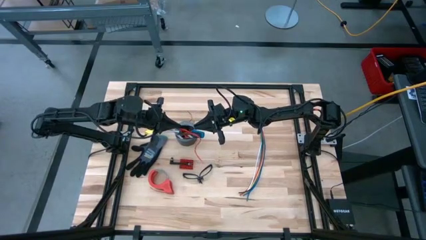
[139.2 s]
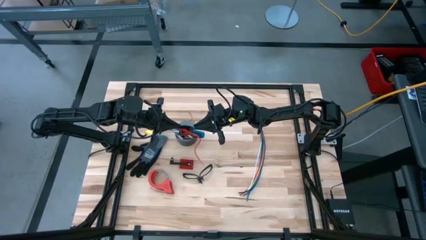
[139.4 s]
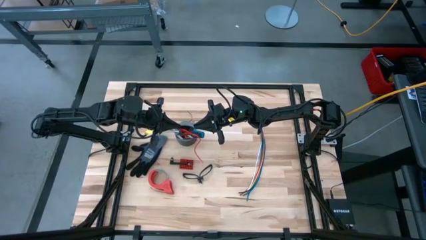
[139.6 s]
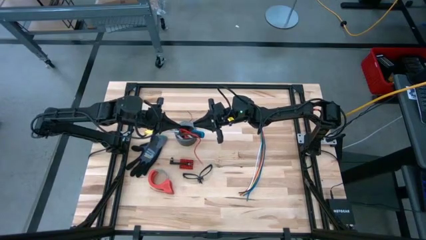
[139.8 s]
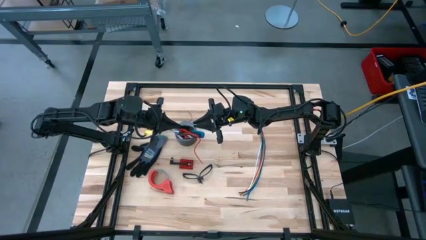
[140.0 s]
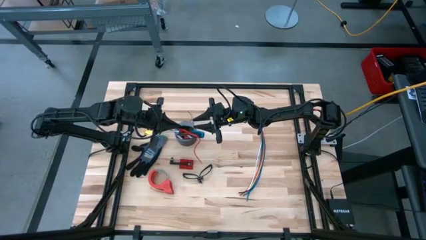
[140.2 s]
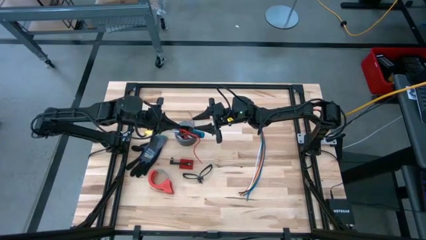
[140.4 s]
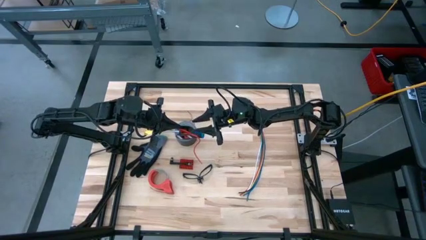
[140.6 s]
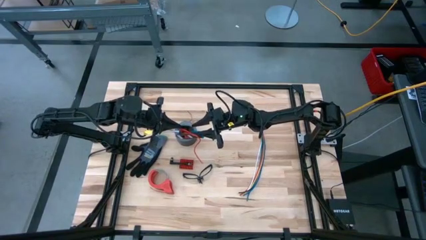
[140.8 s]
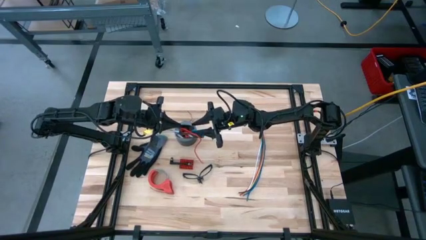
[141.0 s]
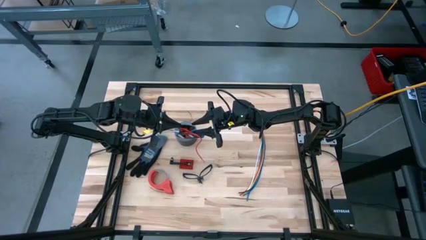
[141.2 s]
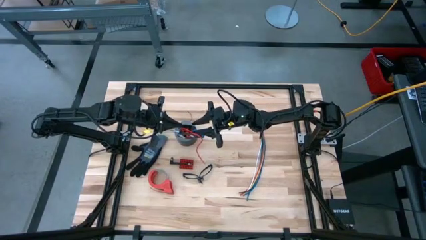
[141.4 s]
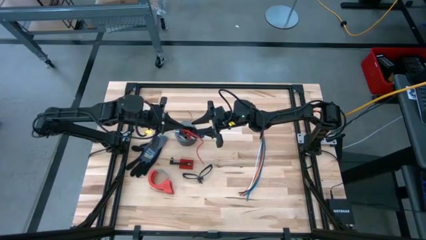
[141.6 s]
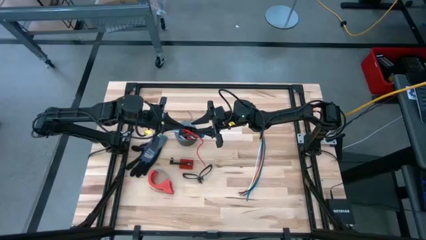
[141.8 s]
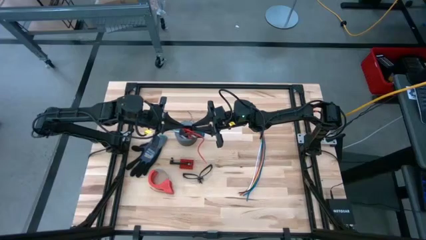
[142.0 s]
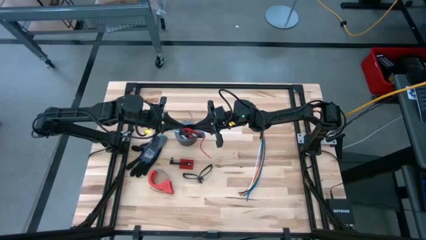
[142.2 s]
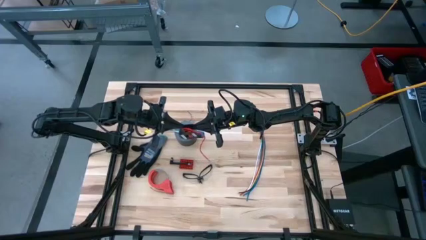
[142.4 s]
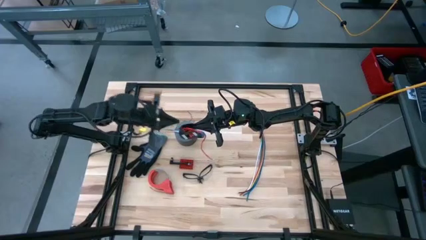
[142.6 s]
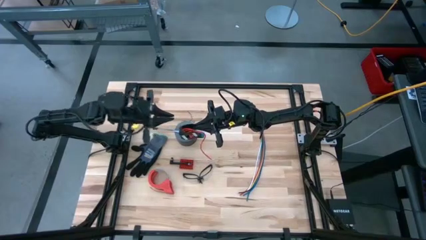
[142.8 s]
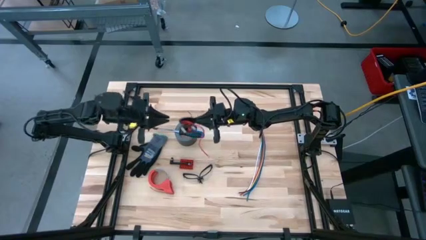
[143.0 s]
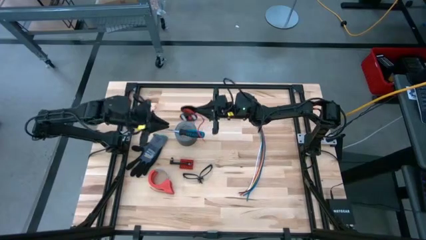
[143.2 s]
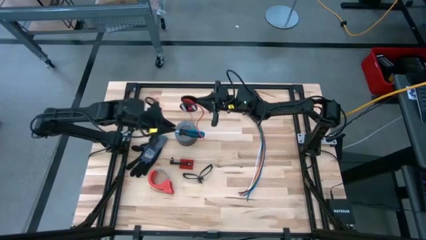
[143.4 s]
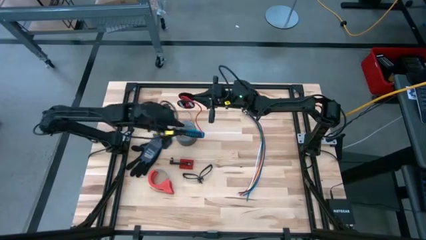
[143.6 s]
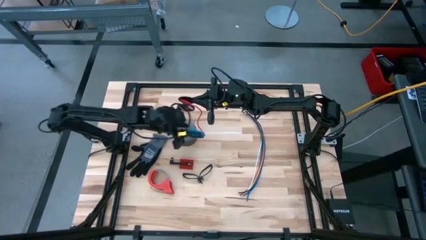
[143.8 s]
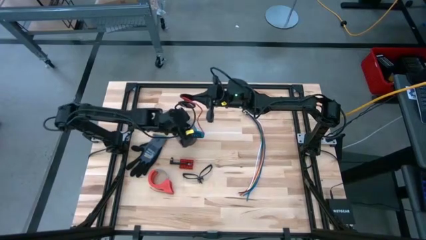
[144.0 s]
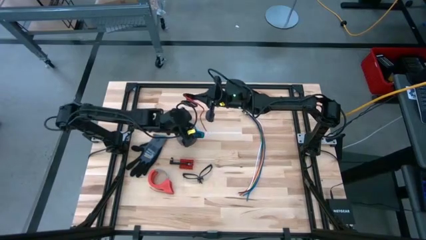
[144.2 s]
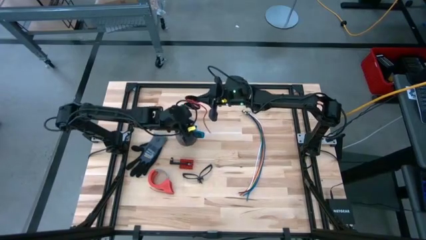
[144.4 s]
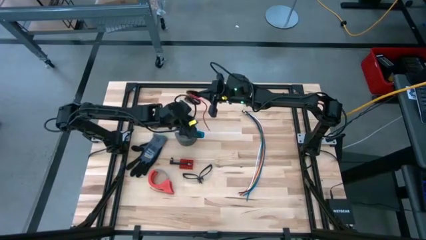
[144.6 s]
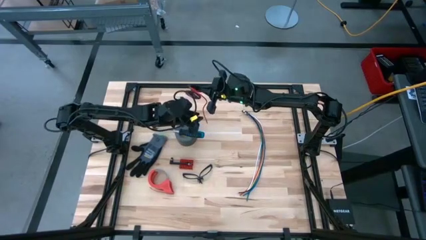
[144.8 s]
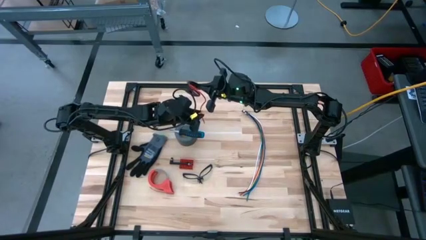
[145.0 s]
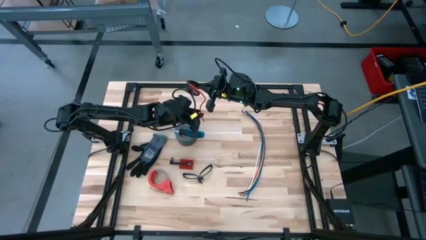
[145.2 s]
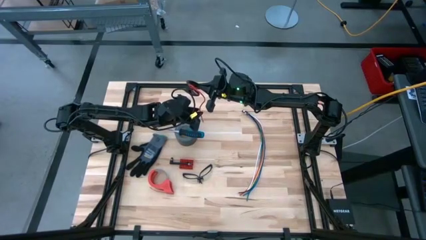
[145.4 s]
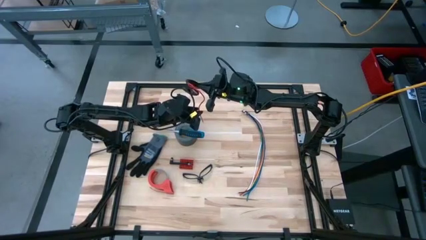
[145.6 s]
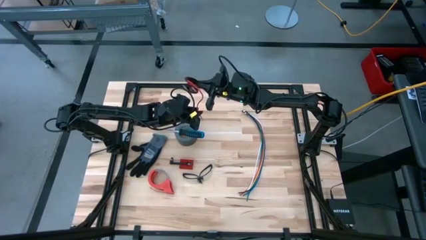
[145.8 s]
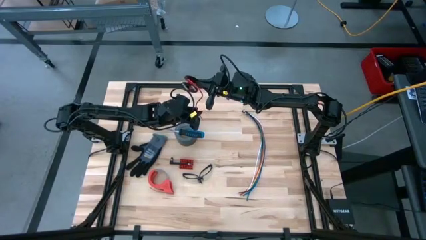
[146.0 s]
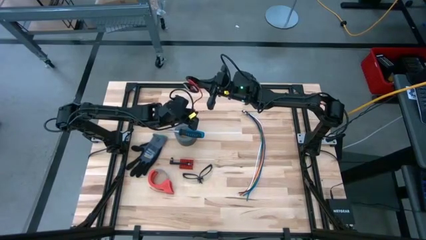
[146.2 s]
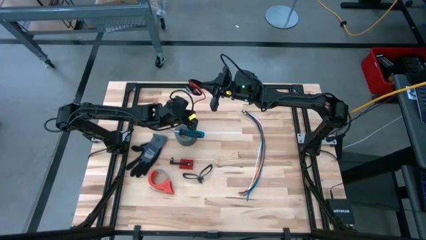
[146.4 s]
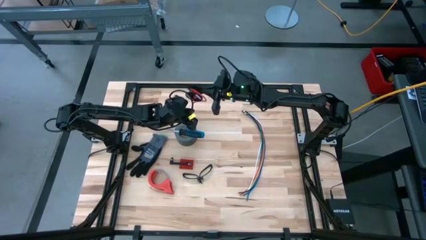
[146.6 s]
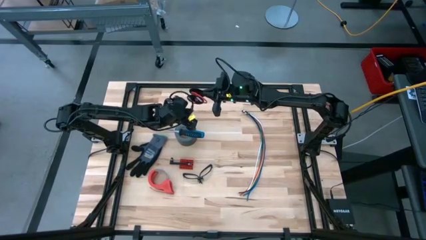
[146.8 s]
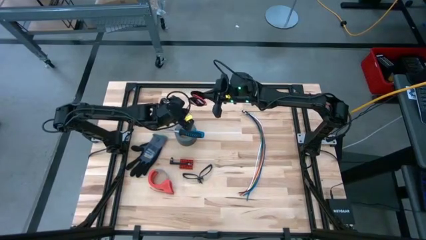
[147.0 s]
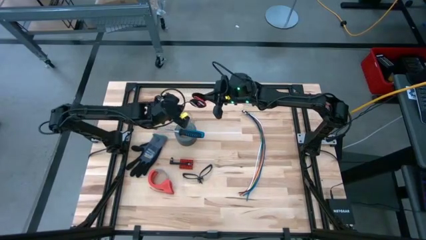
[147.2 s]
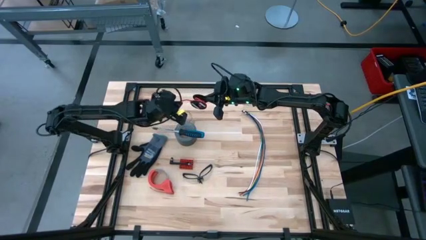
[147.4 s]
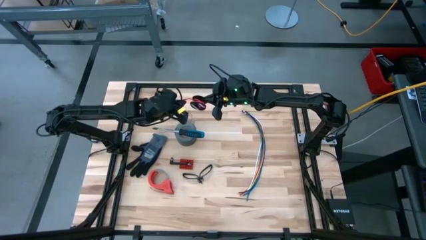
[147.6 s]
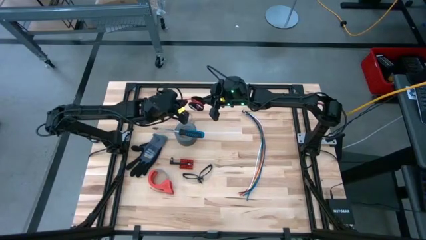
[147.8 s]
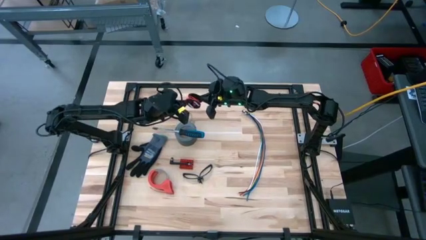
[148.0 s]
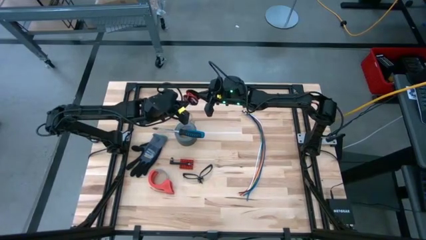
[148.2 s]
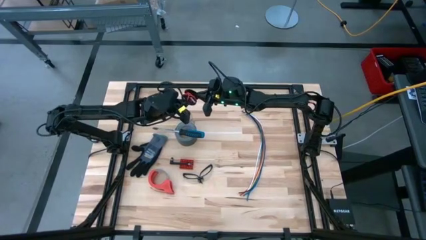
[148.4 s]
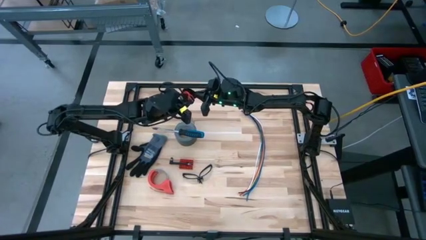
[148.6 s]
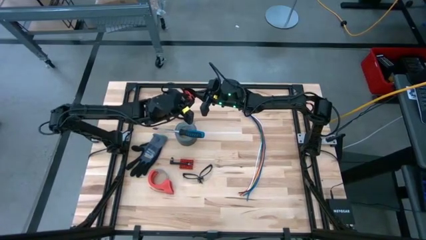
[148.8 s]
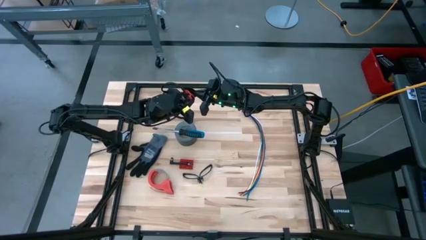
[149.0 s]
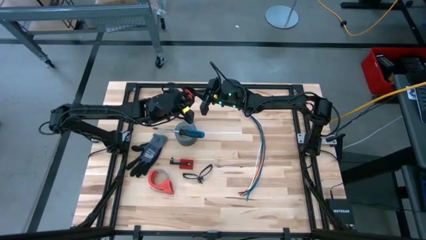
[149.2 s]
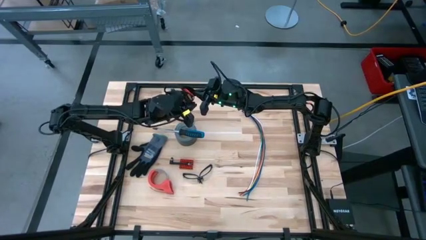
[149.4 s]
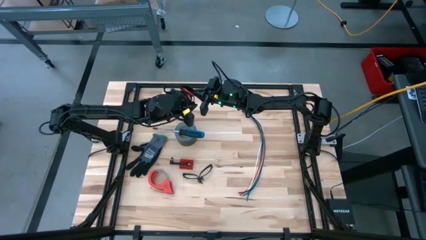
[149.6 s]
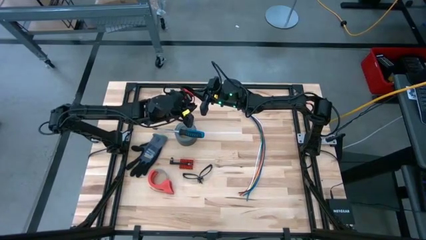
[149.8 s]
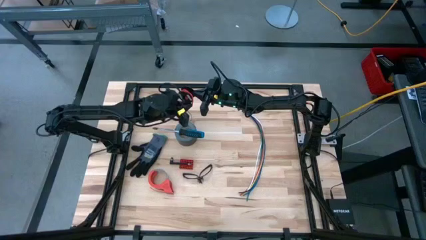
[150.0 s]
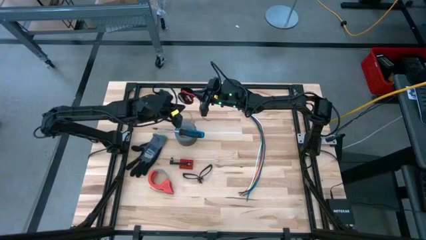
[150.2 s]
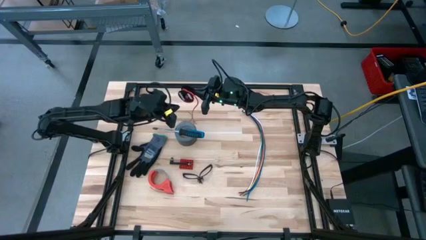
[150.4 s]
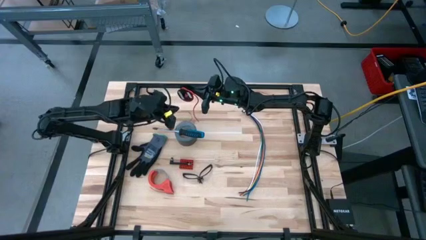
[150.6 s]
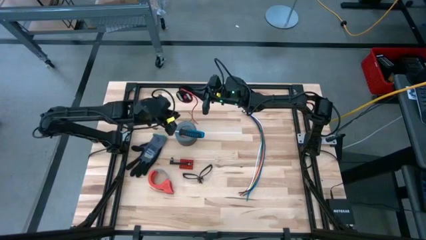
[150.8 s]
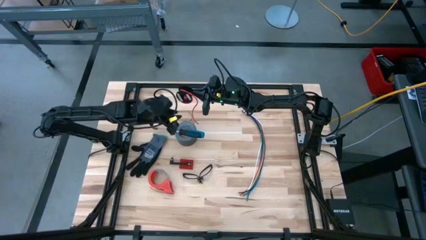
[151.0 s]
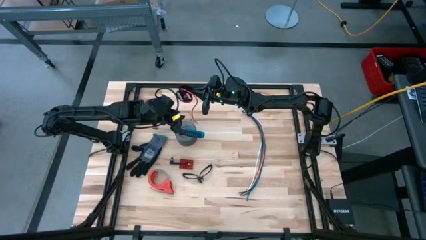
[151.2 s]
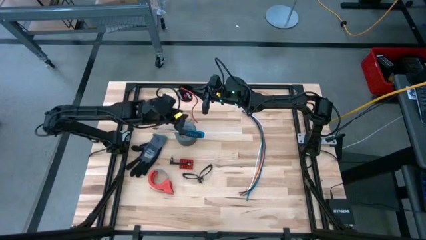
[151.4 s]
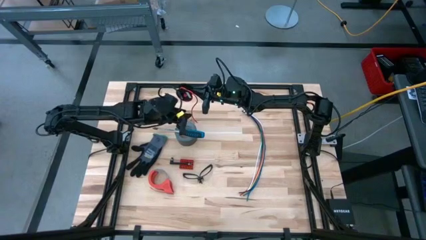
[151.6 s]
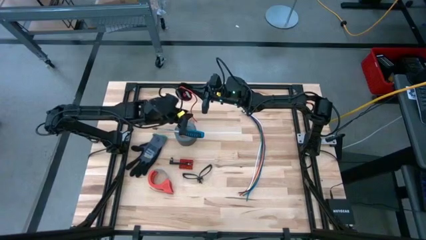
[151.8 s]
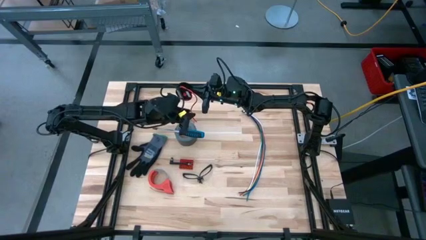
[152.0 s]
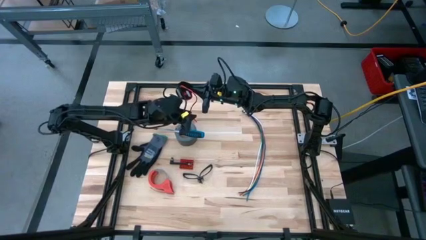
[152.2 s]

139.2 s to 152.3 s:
Task: Coil cords
Coil the red wire into the black spool

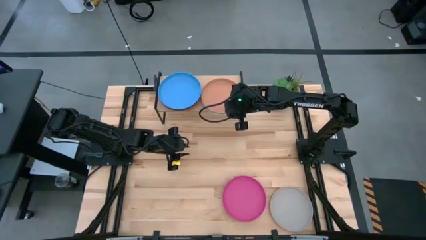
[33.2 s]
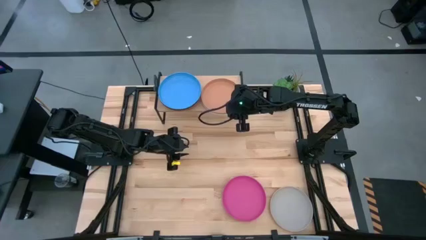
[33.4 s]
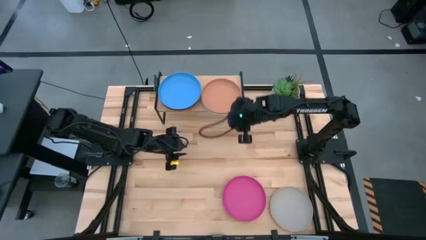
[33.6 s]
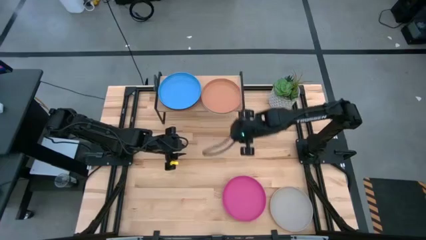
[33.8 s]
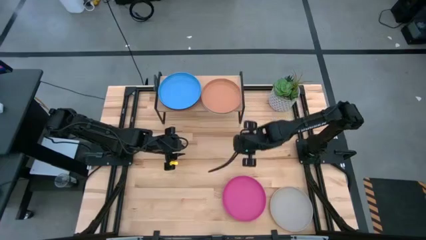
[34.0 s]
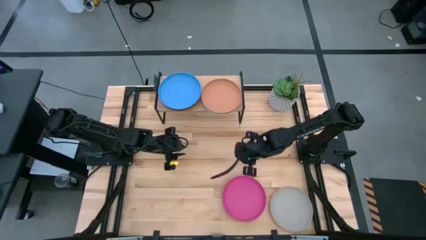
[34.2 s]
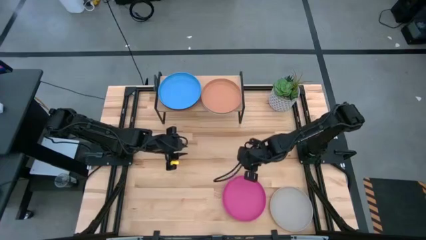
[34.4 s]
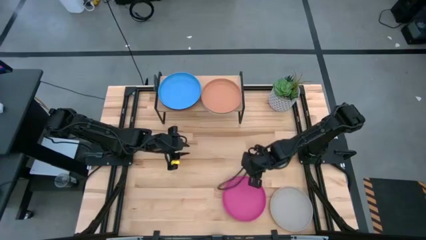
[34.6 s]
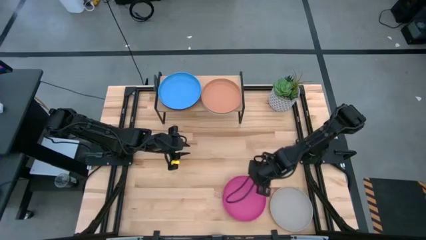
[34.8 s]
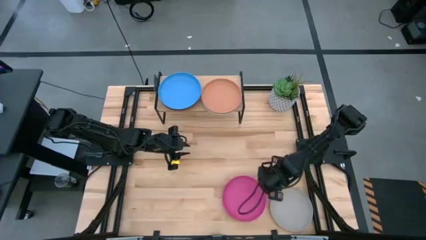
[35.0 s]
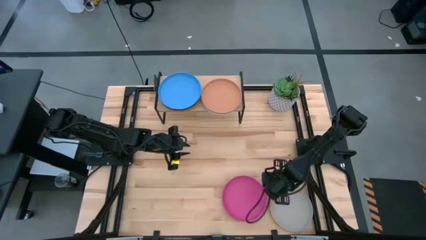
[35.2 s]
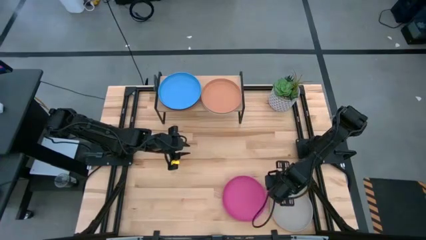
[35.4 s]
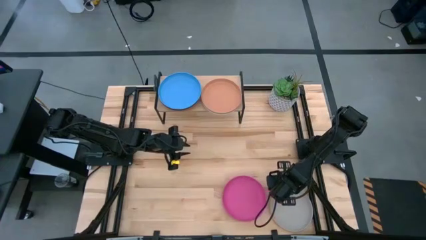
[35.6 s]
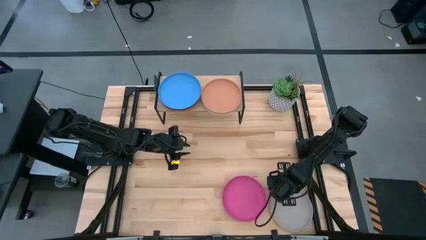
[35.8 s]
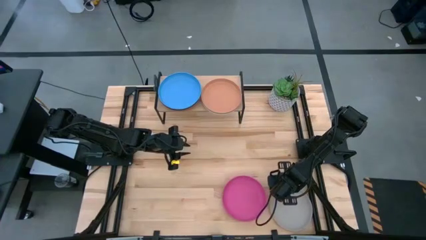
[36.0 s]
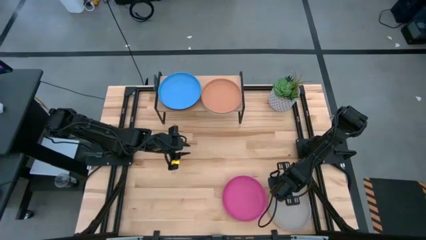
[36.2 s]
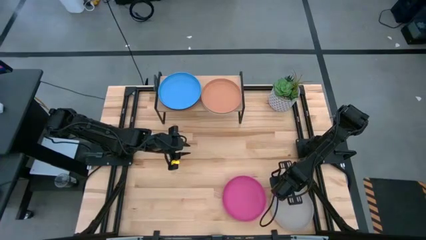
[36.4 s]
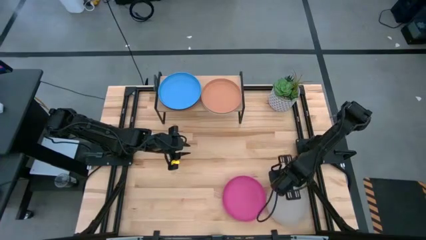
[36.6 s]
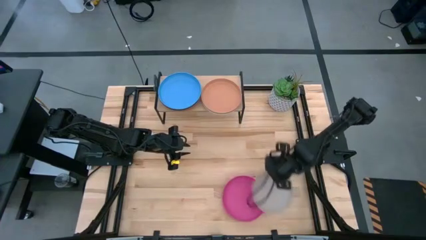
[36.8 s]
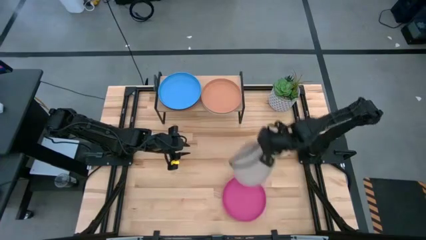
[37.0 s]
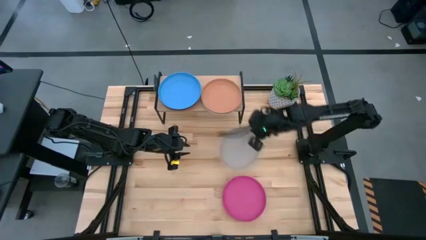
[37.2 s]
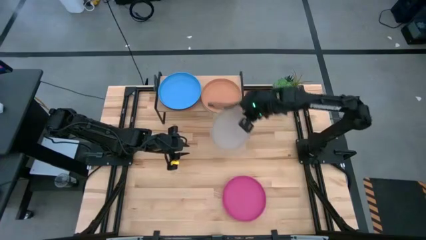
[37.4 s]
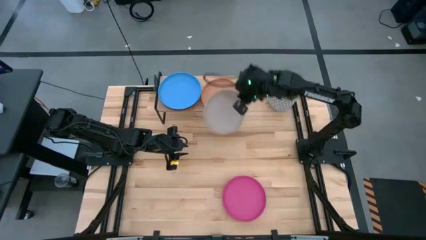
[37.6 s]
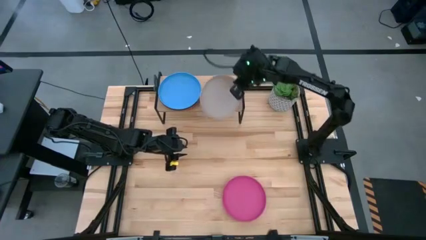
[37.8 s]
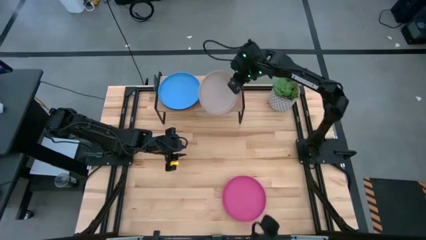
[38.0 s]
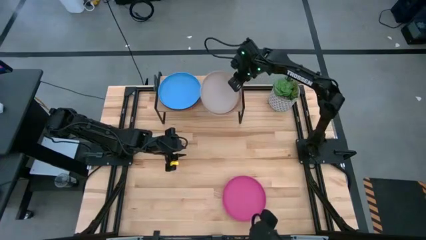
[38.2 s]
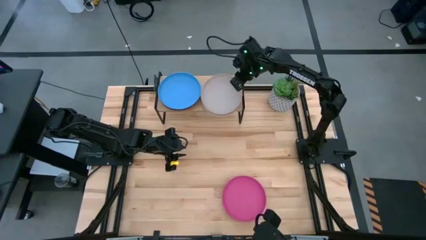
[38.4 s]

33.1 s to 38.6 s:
Task: Place and stack plates onto a shelf
Stack the gray plate on top of the brown plate on the shelf
